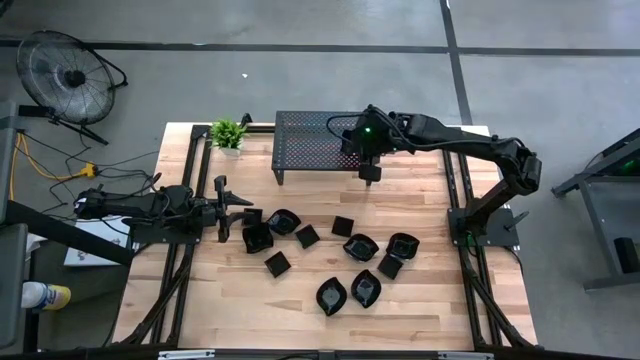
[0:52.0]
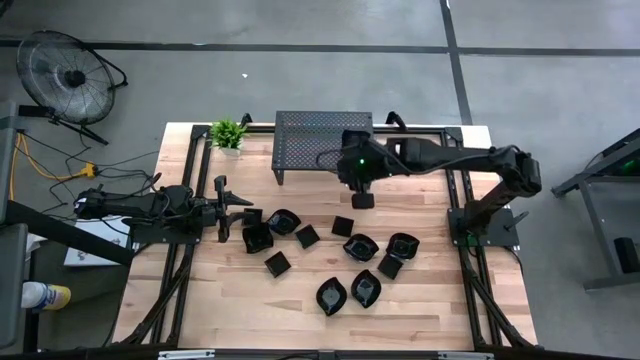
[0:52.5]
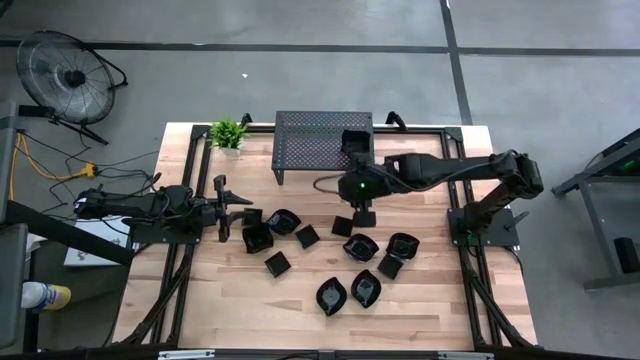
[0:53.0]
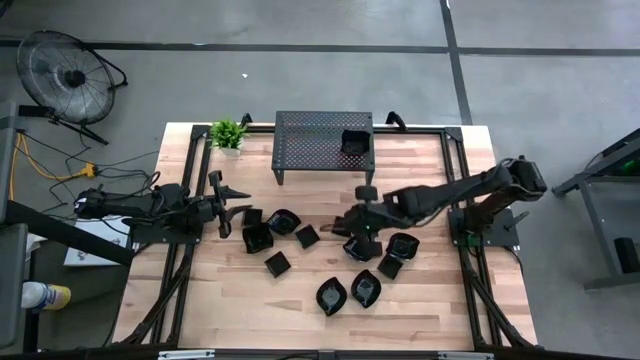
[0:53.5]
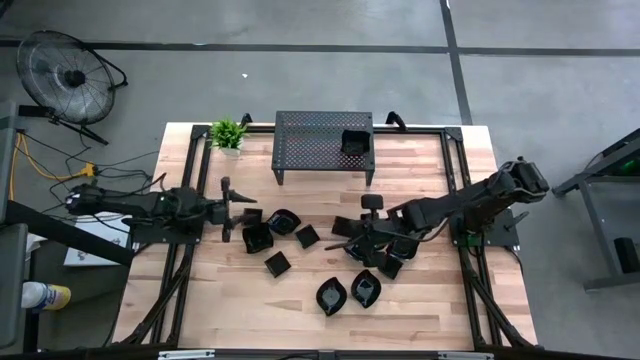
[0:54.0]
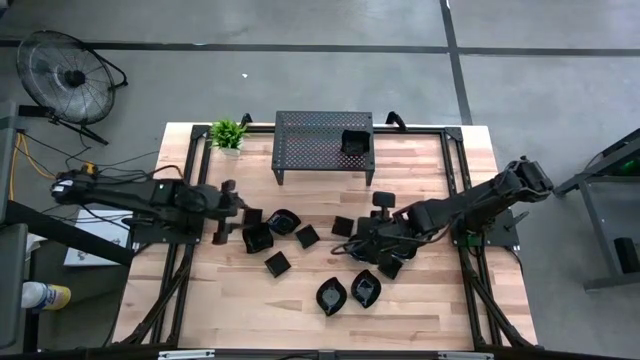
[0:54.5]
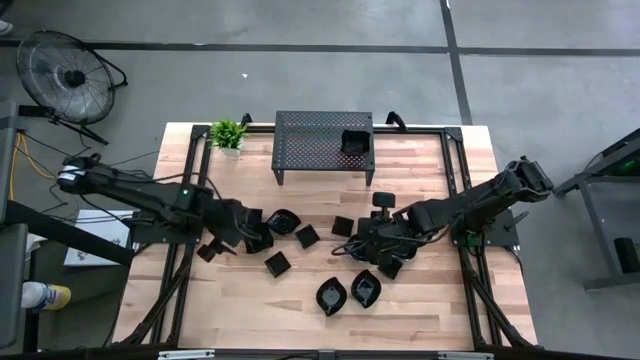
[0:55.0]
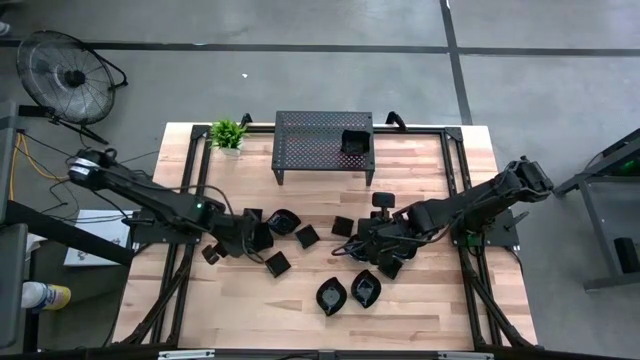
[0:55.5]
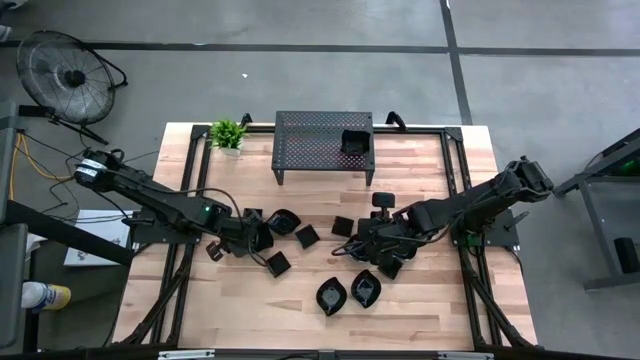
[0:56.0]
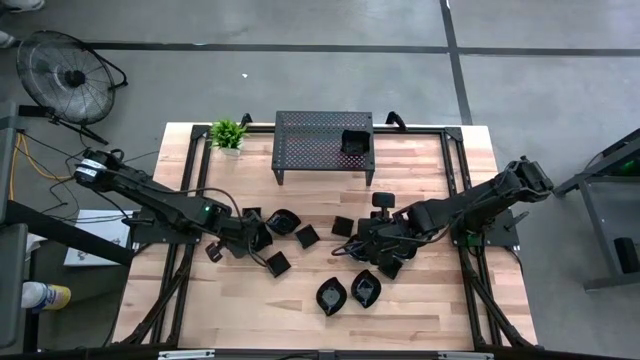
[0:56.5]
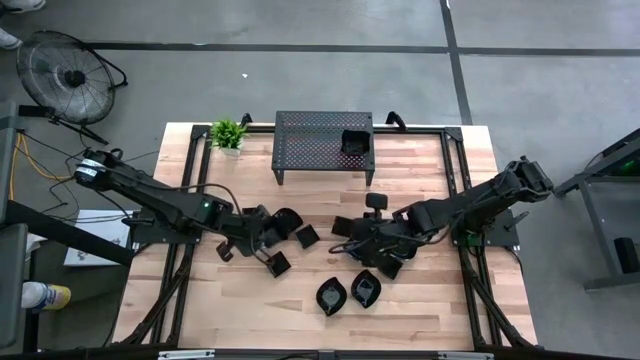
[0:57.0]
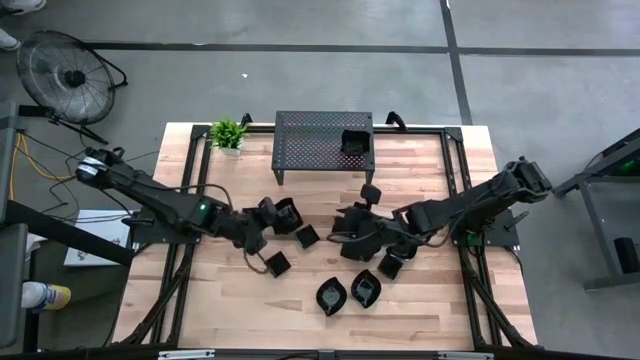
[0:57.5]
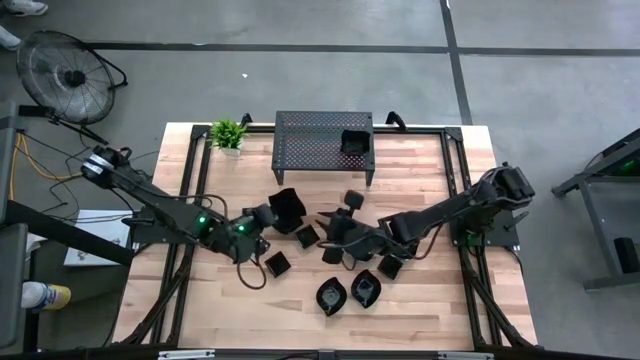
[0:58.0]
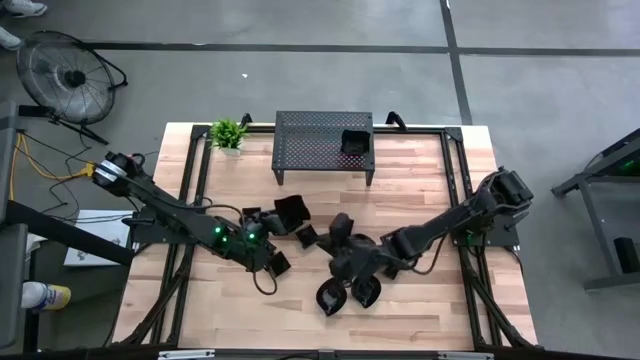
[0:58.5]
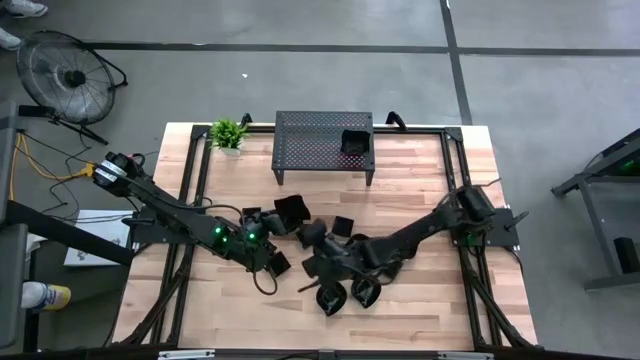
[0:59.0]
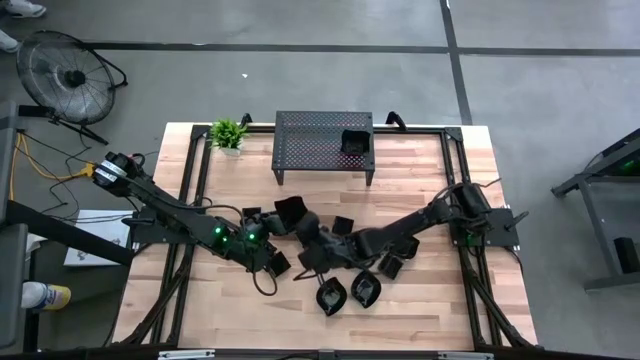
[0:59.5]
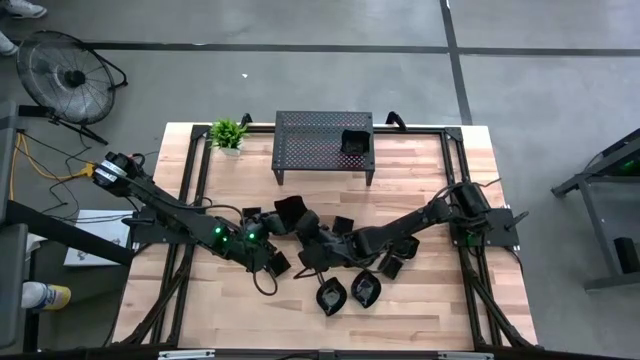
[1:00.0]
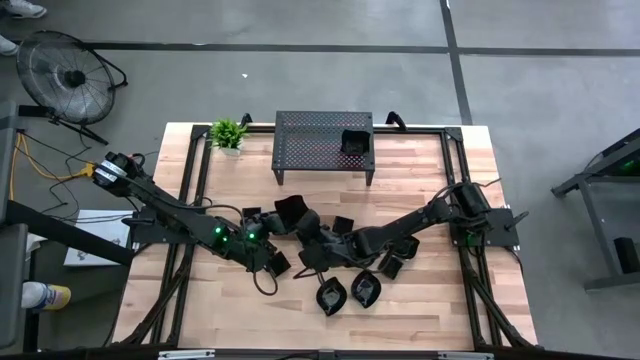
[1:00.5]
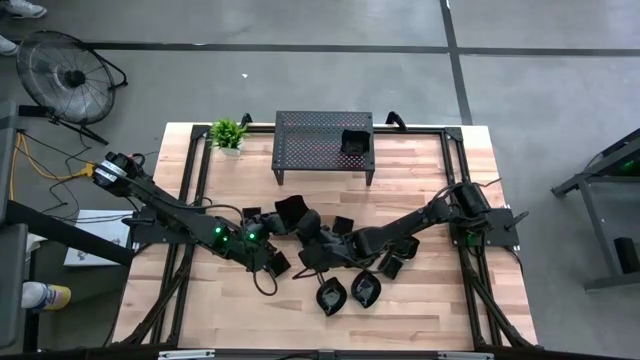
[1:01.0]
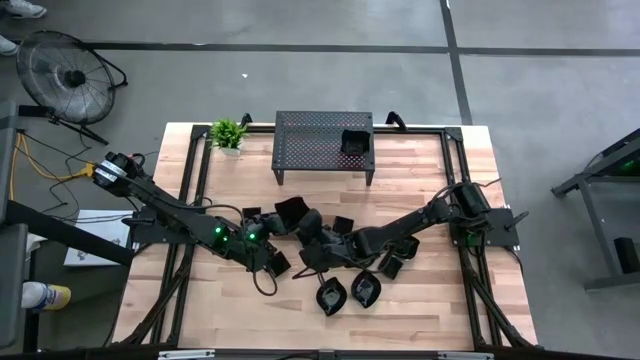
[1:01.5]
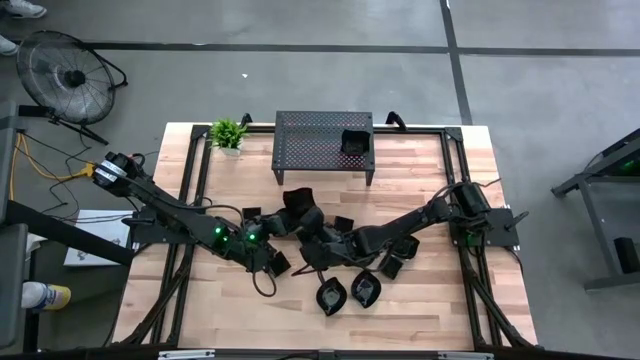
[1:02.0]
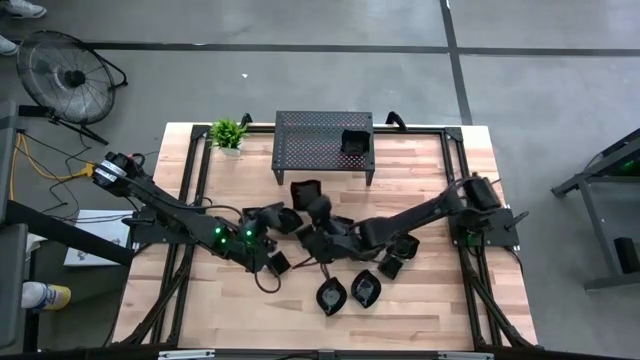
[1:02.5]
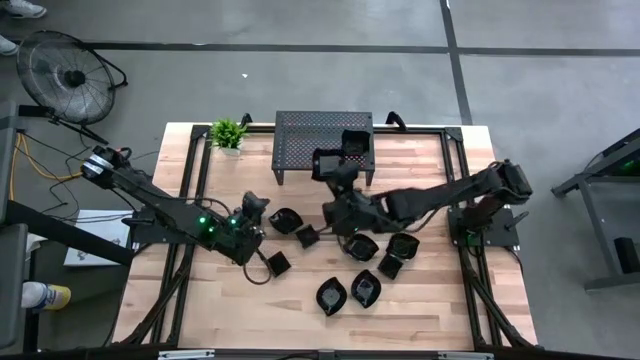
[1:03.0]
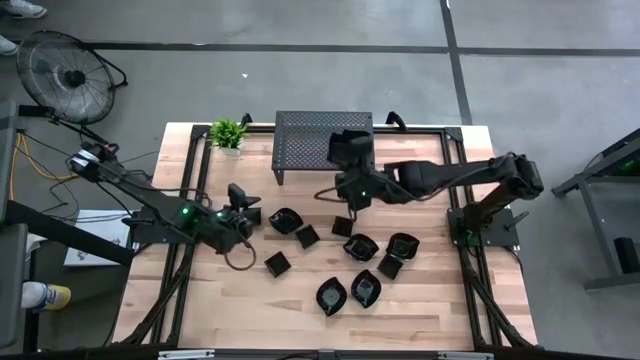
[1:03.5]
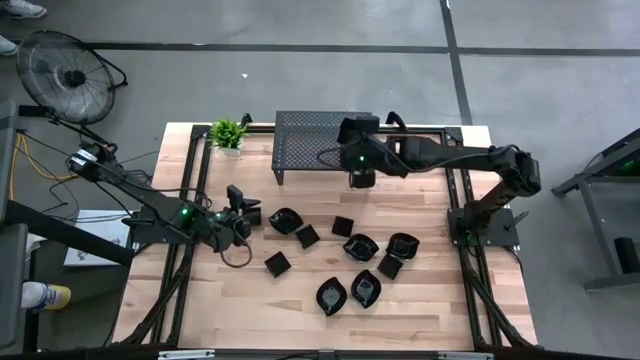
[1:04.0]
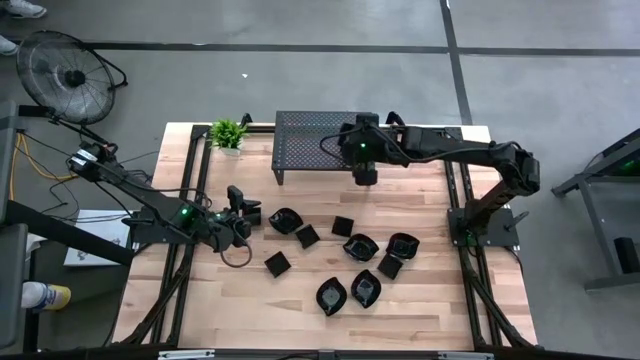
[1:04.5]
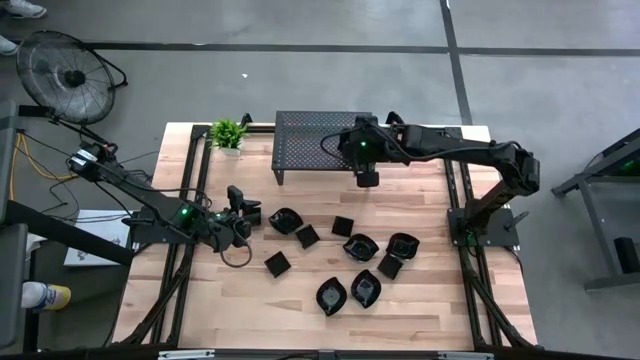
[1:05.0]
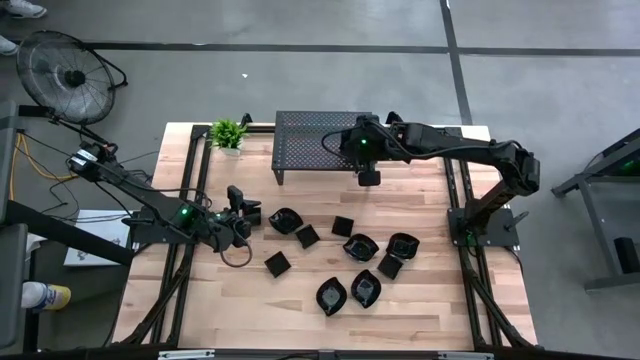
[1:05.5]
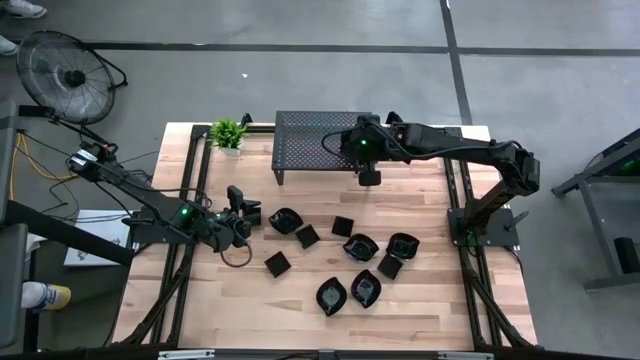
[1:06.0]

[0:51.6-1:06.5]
Task: Pick & Place Mini shaped plates
Stack the distorted square plate on top of the distorted square plate on the shelf

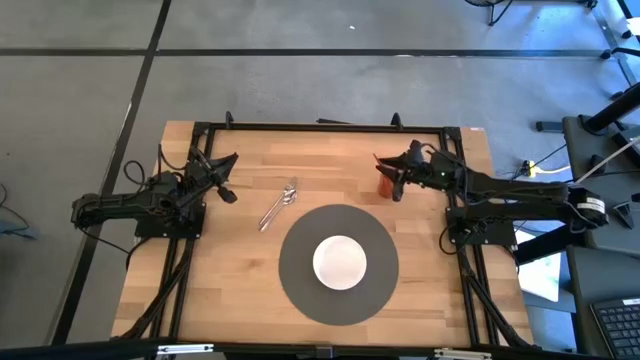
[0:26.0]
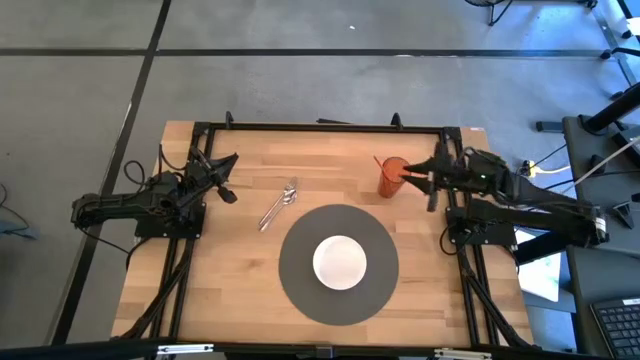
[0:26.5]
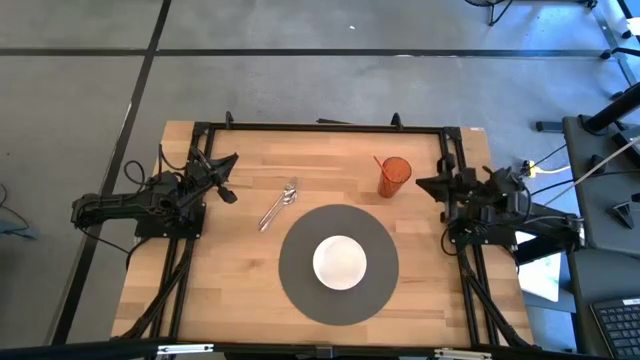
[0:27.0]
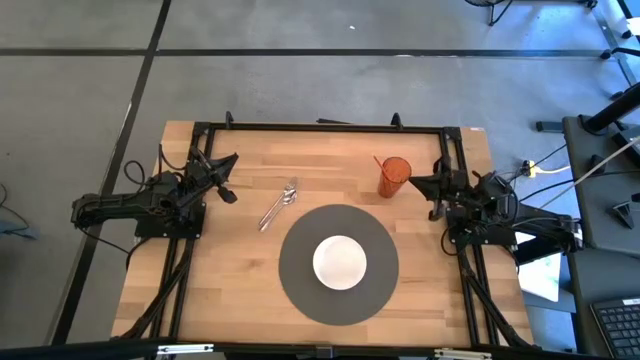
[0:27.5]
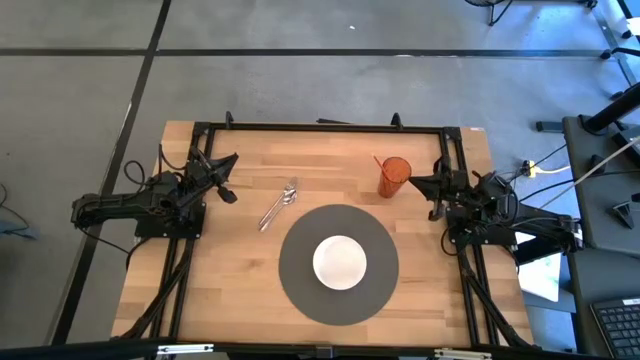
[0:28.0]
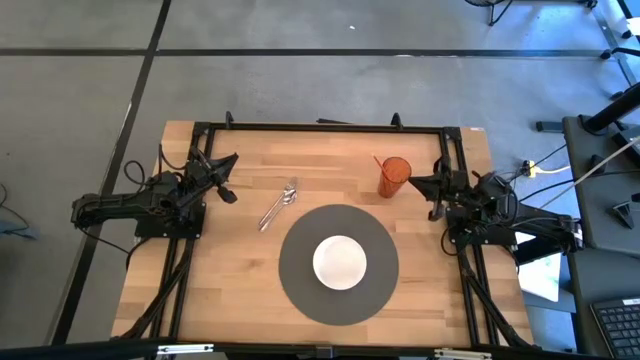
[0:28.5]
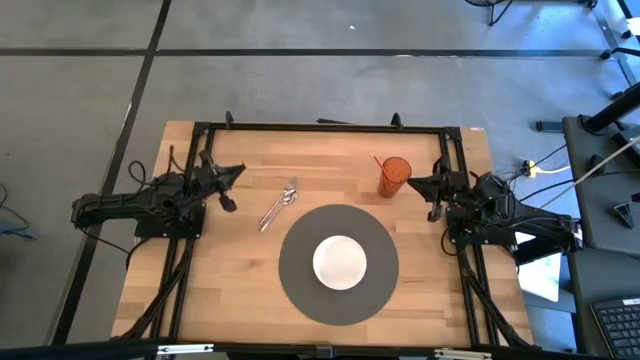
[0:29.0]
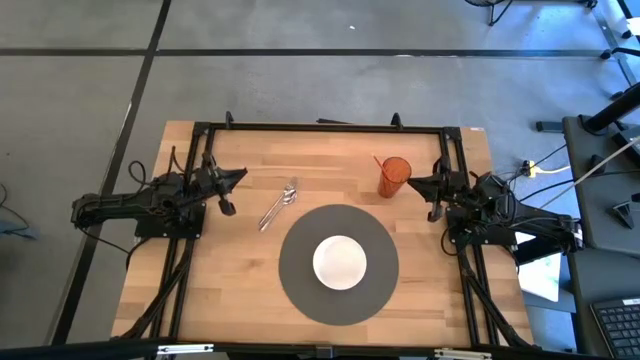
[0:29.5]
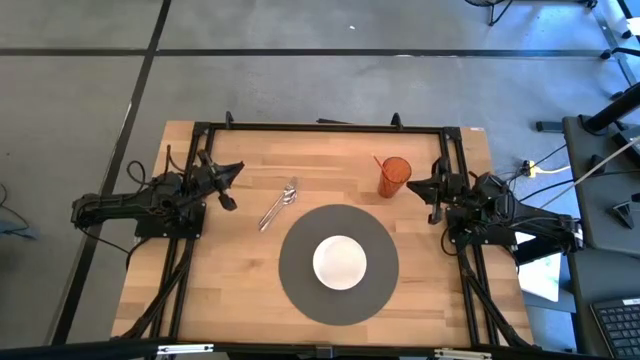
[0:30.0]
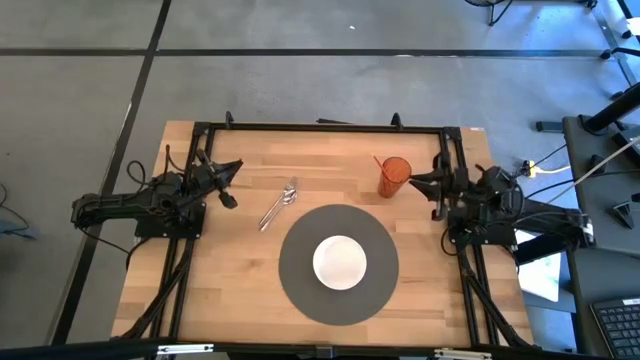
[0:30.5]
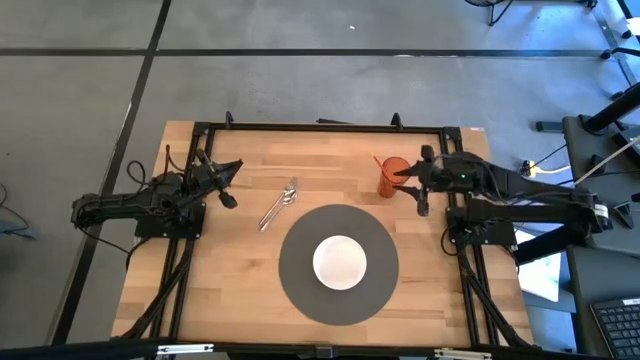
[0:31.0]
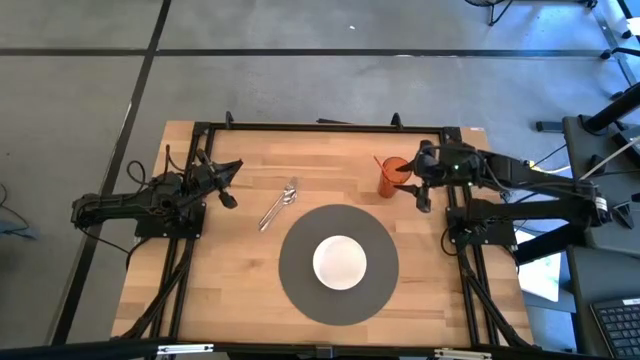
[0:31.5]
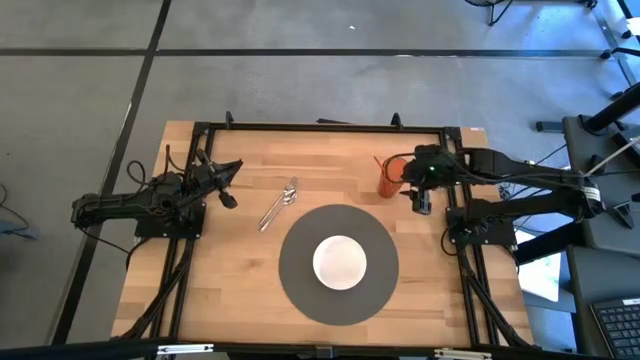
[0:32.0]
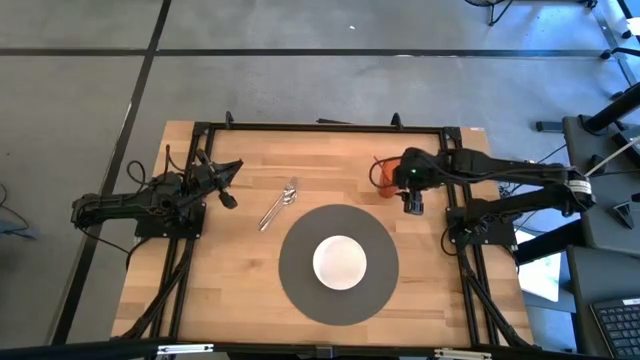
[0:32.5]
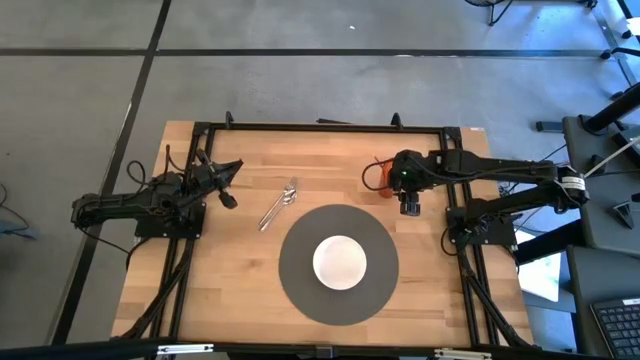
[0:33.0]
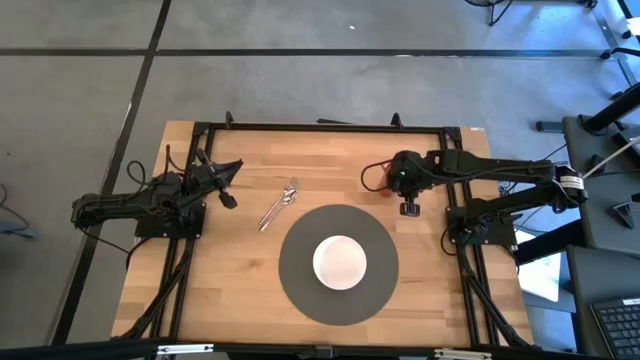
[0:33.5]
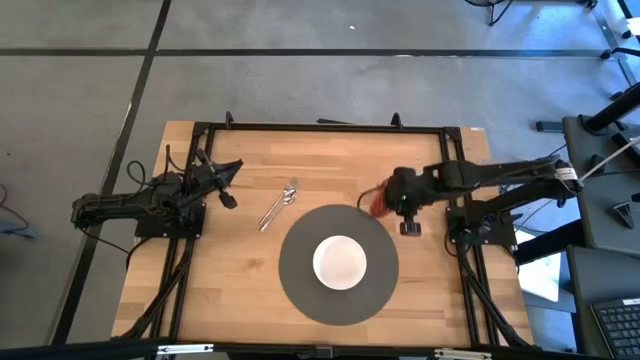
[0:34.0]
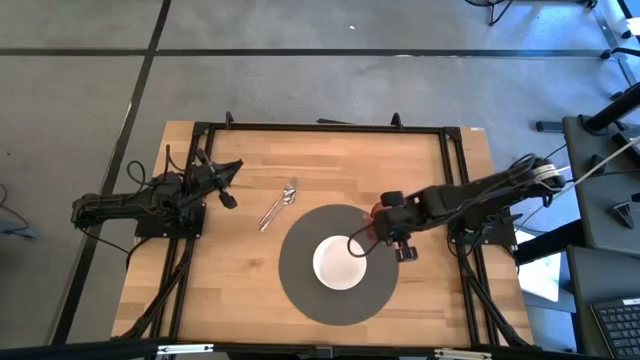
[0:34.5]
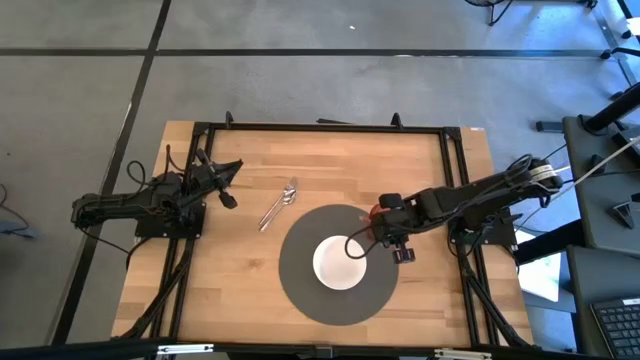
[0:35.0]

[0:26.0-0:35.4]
Task: Pick & Place Utensil
Put the orange glass to the top right of the white bowl on the gray placemat
